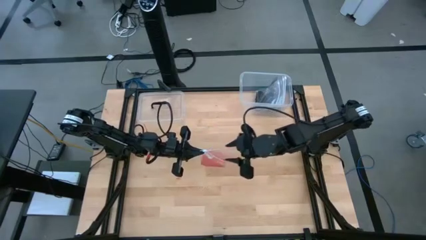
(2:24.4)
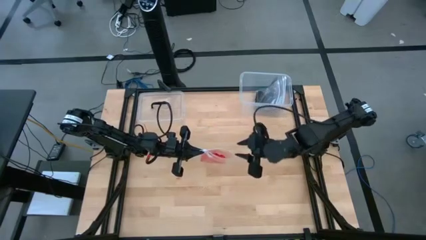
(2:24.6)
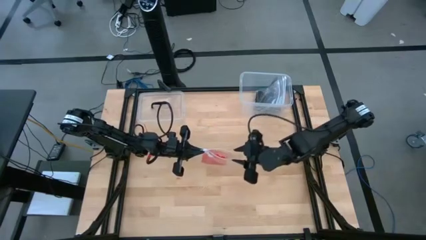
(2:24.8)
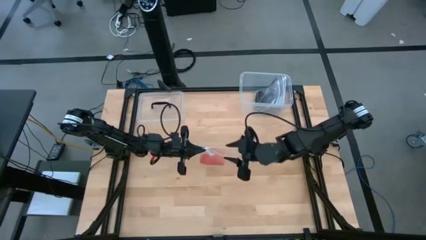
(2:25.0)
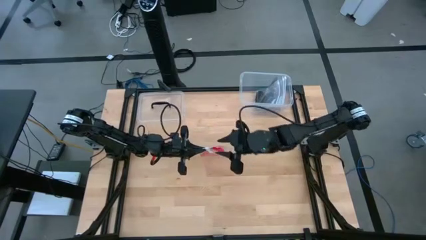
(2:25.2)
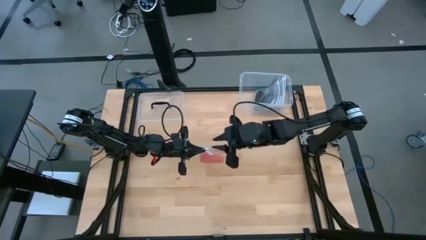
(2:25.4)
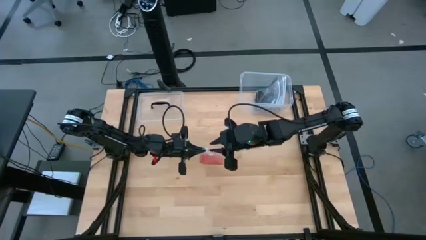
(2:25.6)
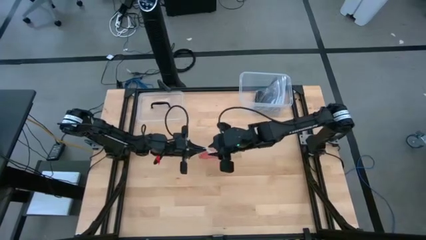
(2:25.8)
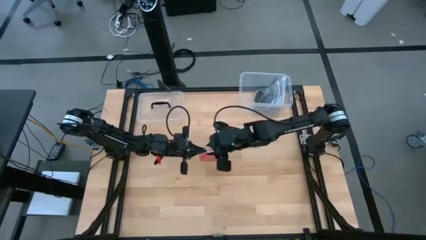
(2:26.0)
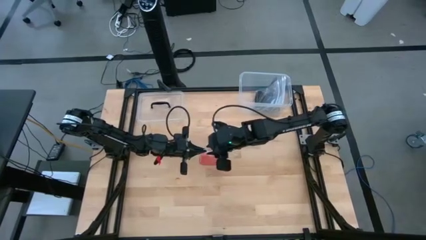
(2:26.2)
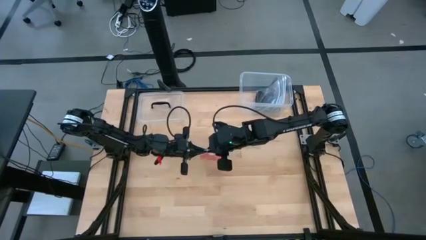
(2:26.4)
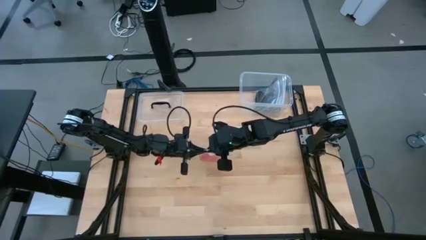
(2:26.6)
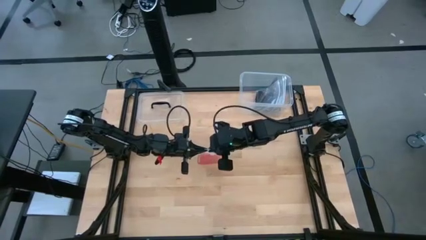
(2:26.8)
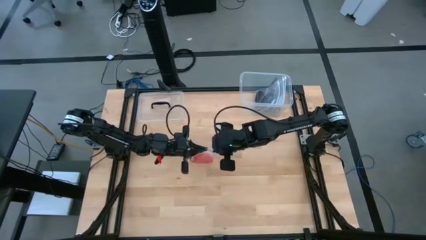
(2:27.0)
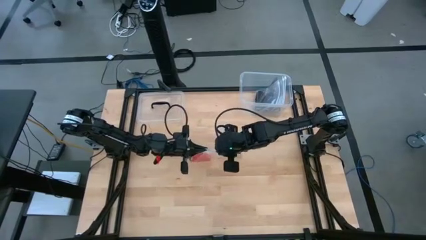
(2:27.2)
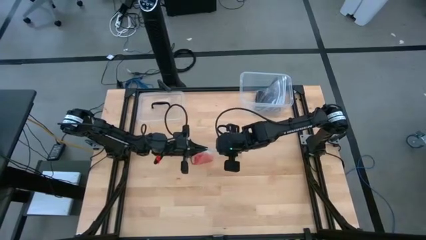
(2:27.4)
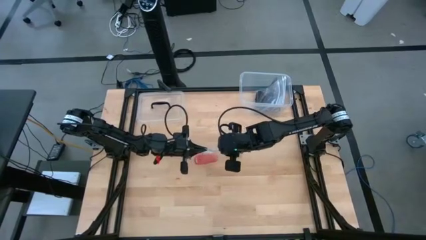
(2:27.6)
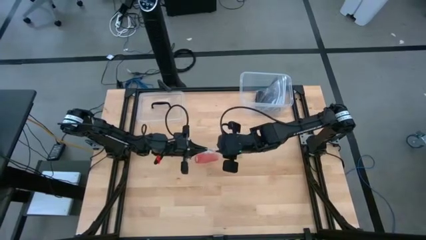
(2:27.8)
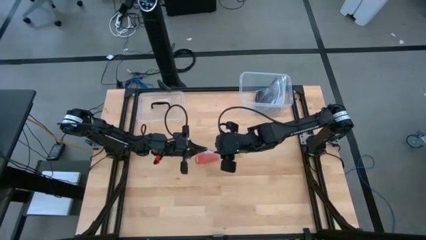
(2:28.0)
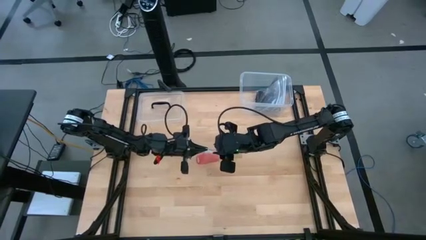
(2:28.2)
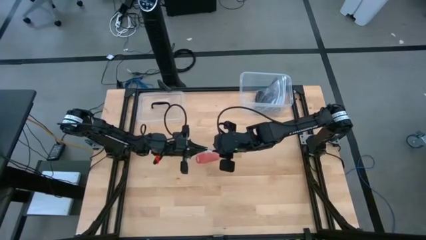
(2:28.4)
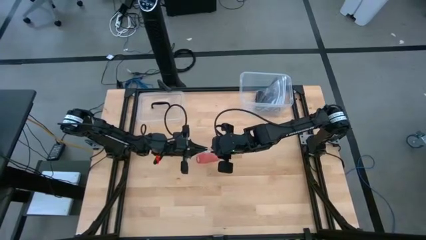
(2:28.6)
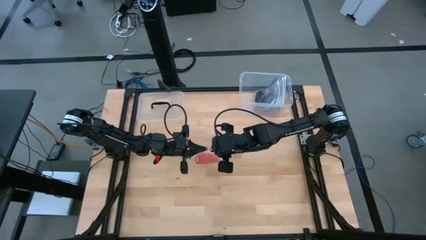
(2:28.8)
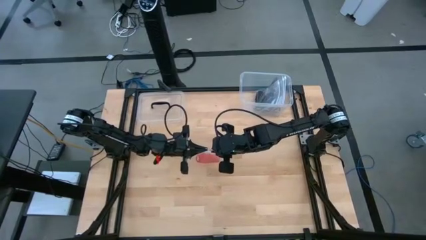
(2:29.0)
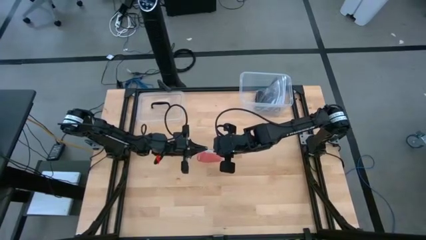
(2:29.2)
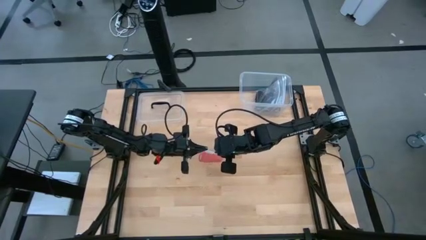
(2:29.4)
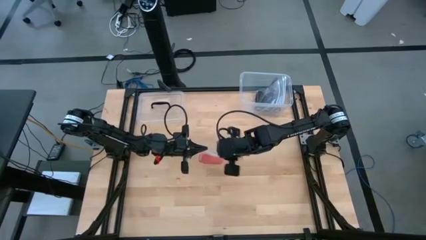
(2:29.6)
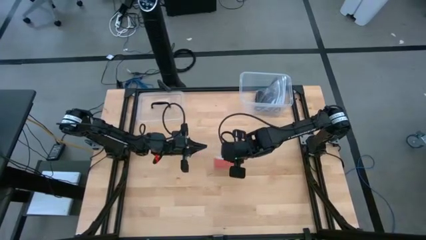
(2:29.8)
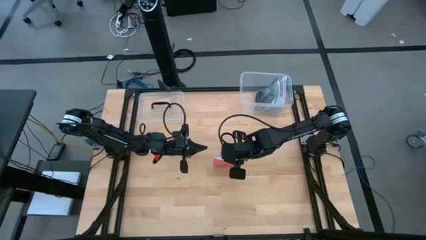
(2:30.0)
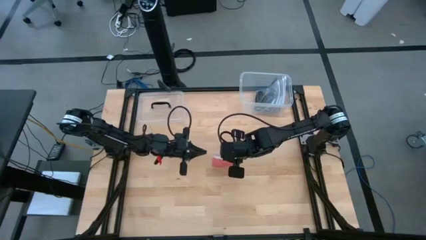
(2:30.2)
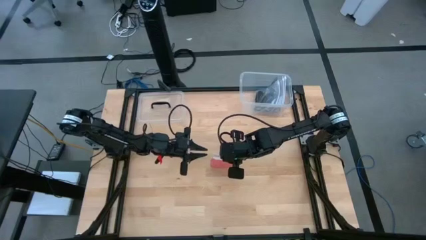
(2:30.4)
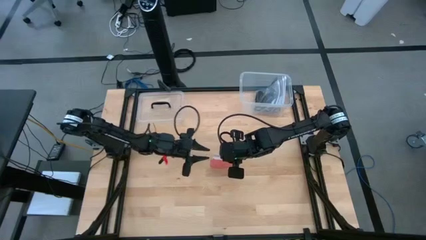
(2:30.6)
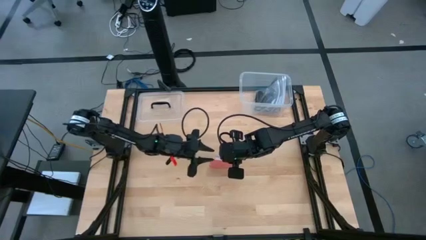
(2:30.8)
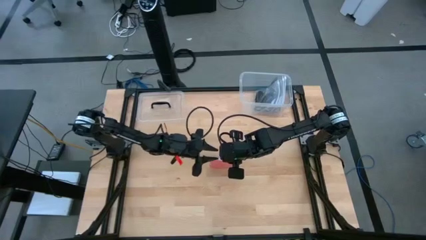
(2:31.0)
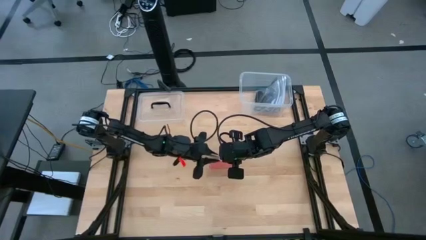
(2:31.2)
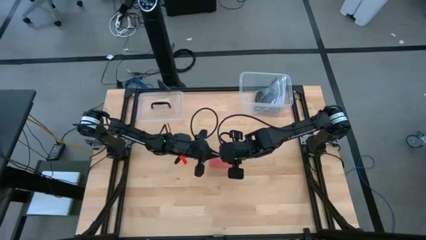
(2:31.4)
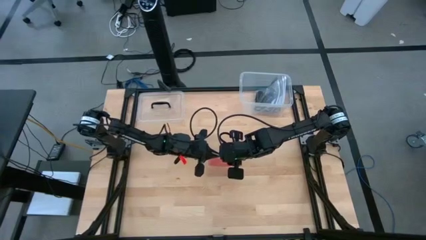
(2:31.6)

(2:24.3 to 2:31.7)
Task: Roll bandage
Close the transparent zip bag

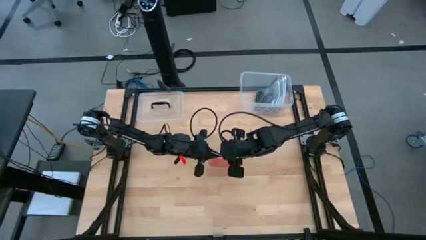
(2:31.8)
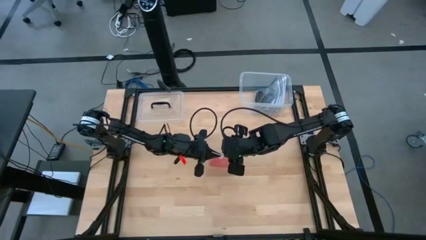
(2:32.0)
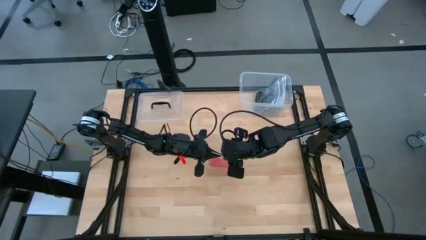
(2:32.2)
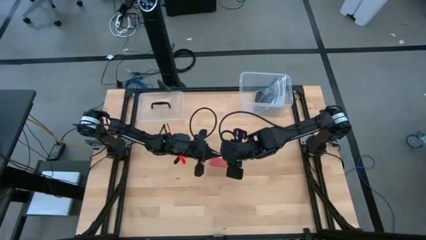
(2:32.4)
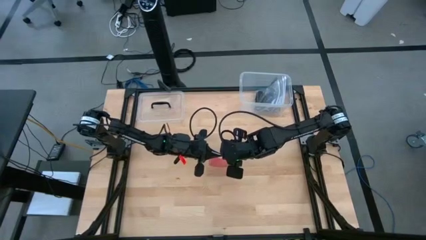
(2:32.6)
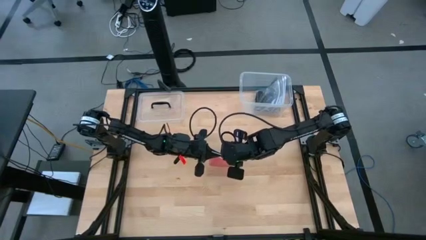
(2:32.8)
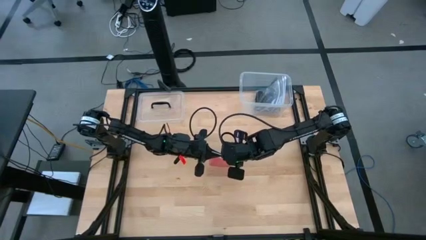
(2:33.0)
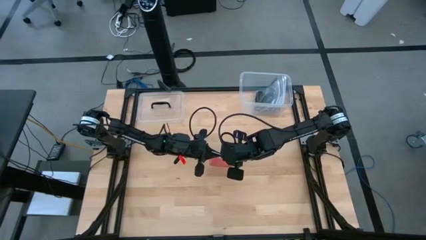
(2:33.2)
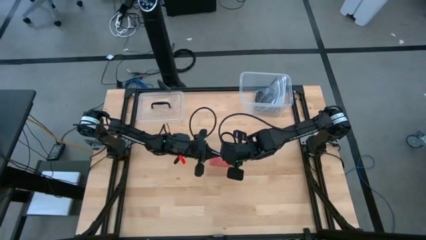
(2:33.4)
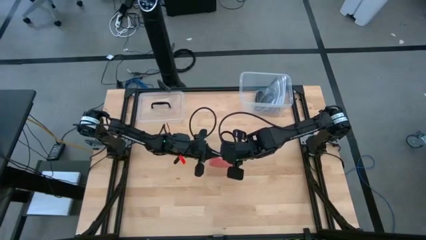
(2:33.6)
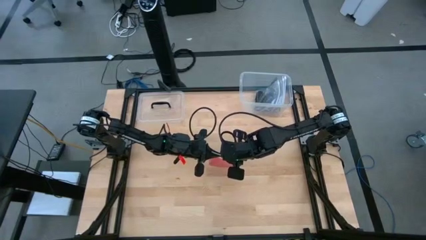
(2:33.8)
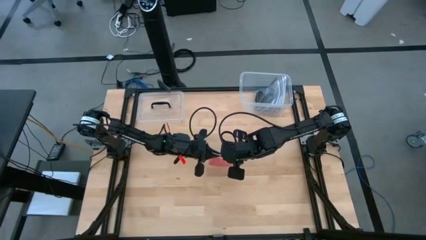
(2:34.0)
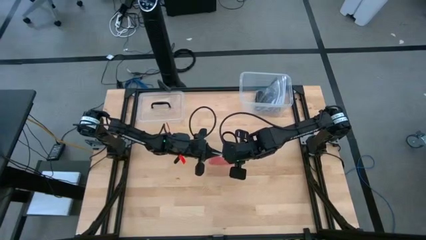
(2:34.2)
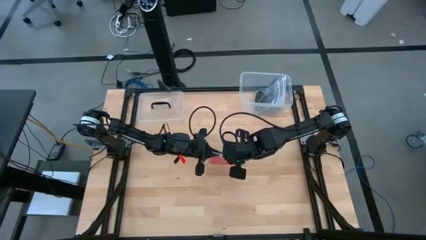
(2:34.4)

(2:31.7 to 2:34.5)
Close the transparent zip bag

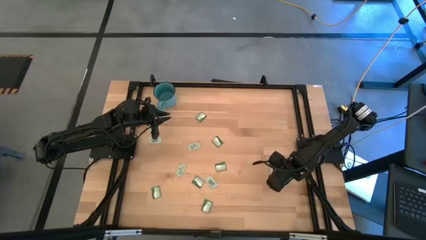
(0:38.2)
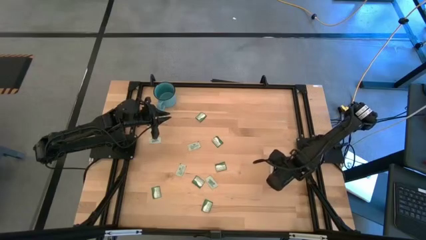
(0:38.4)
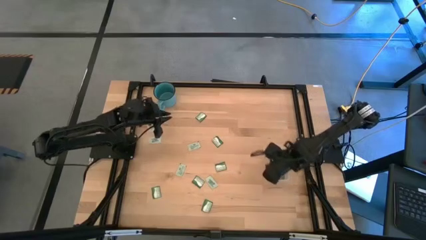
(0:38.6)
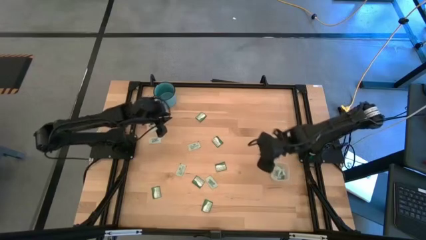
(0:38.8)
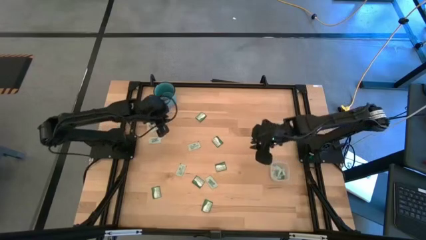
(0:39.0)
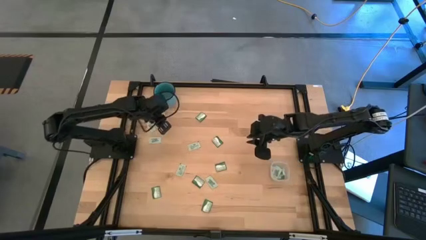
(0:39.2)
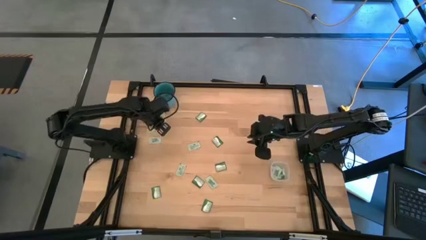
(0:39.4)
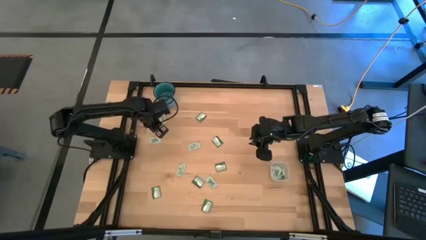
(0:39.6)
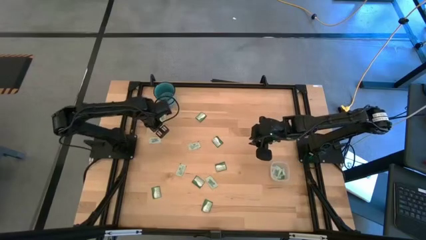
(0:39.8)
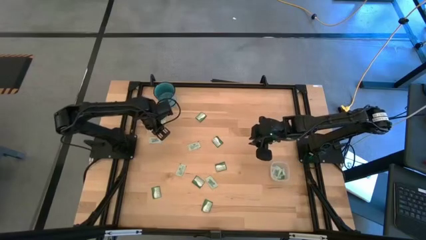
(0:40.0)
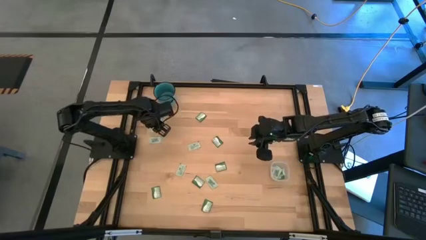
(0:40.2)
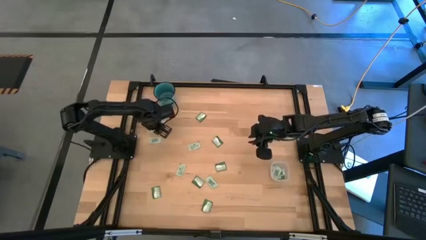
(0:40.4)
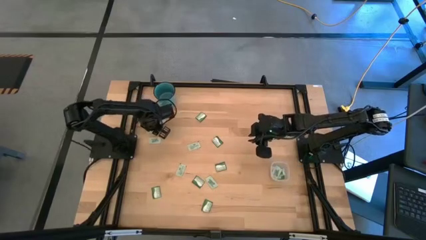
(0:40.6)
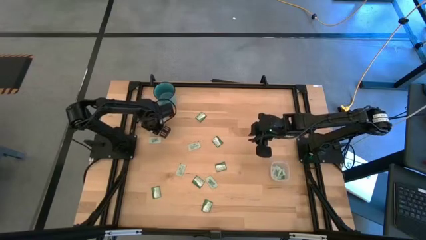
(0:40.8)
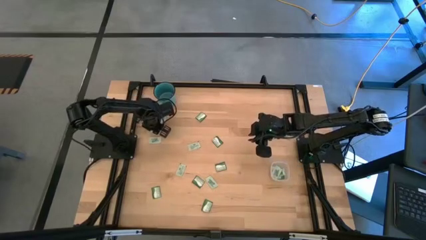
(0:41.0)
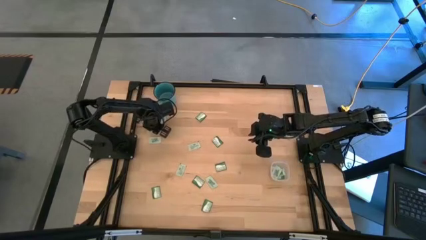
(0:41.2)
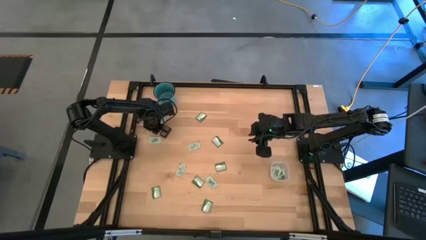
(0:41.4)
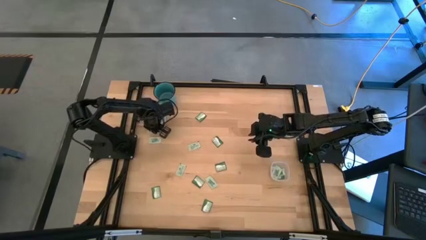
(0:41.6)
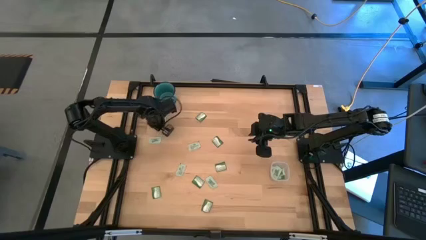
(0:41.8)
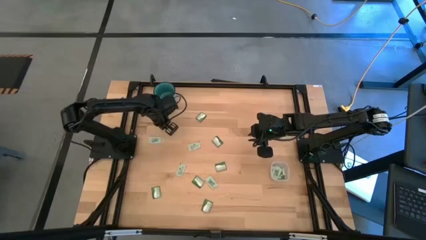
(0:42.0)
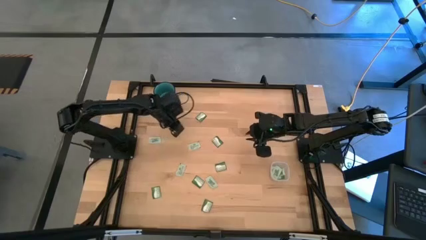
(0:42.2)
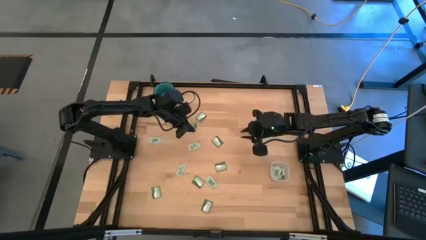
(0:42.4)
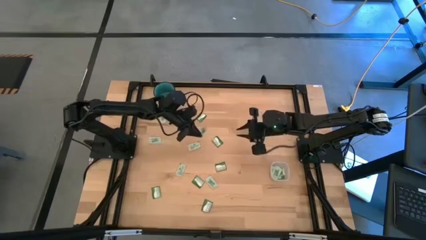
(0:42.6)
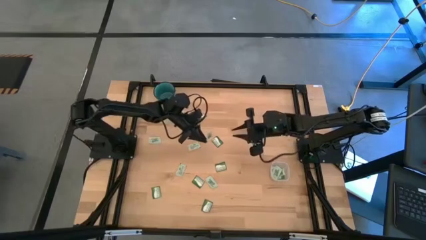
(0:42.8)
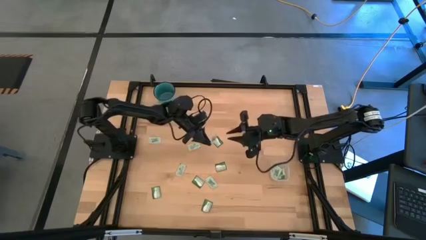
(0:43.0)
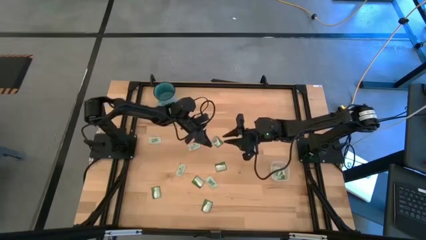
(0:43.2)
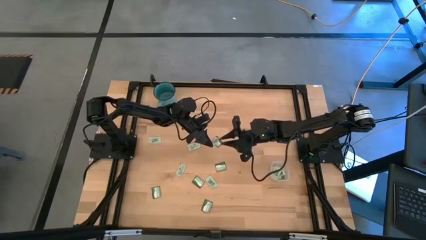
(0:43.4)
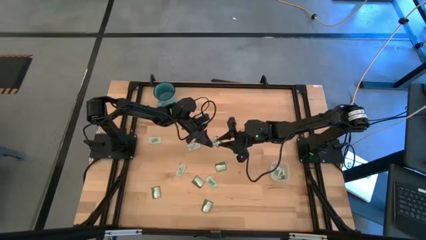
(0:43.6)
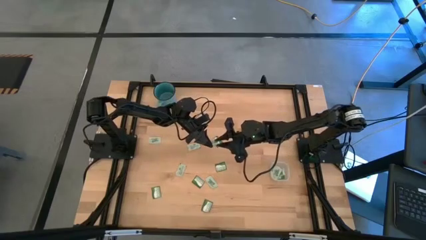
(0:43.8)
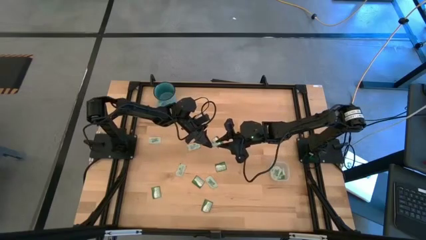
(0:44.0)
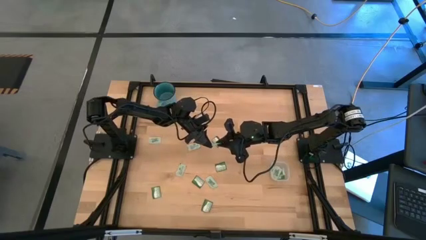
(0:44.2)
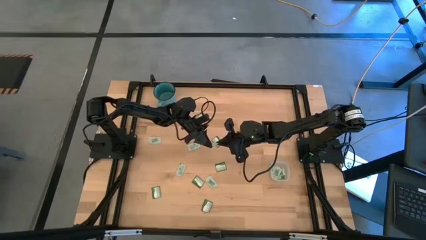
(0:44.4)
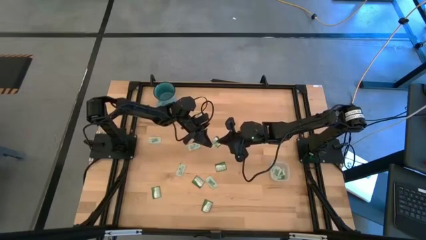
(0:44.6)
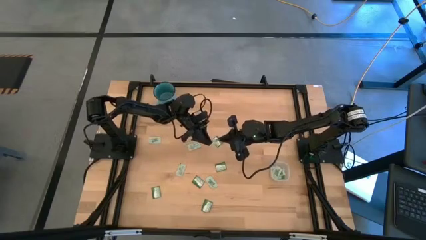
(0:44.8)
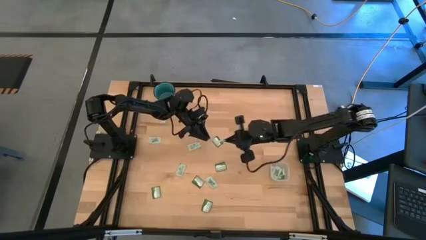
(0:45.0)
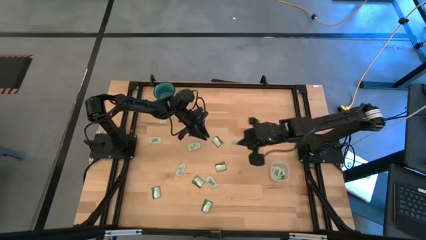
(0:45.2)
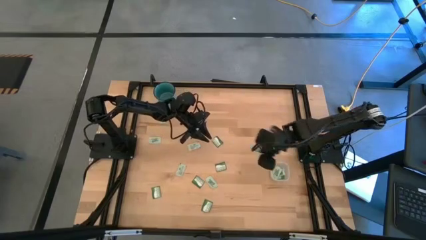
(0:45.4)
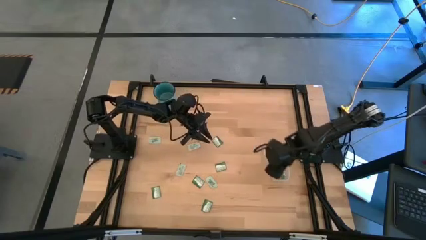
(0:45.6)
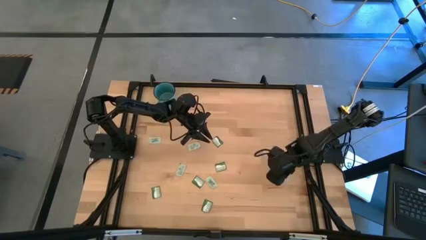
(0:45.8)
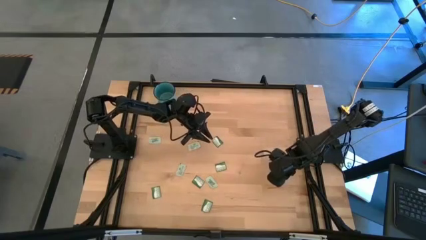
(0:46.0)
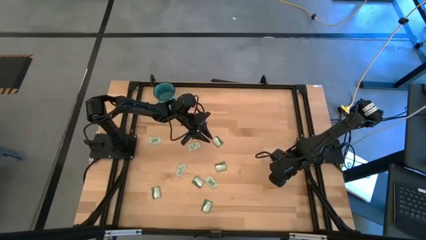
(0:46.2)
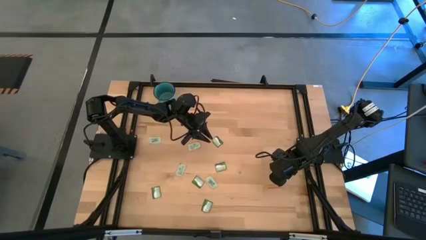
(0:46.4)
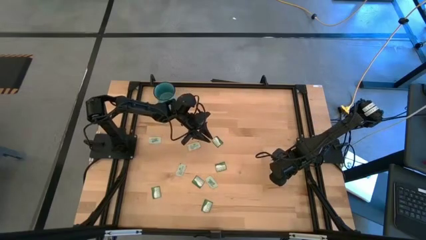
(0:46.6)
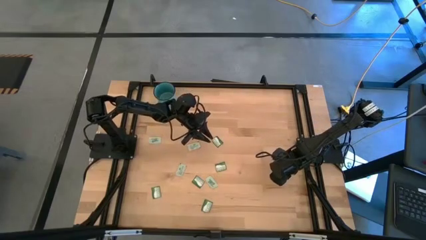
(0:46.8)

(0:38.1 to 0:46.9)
Task: Pick and place items into bin
Put the white stevia packet into the transparent bin
